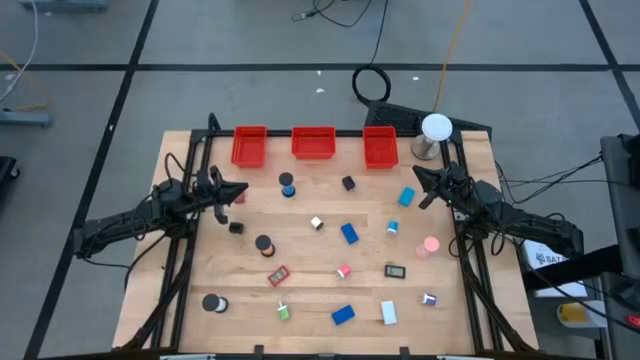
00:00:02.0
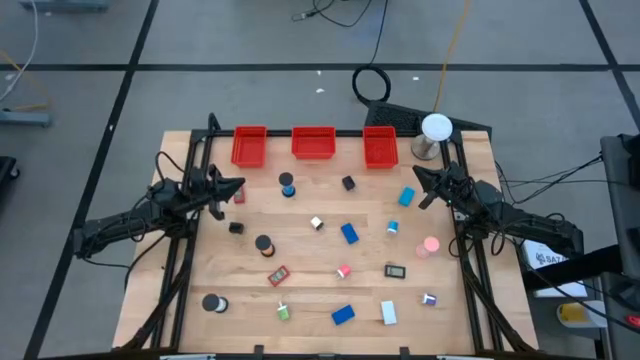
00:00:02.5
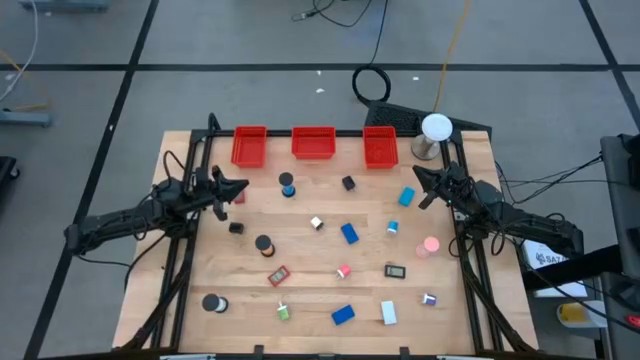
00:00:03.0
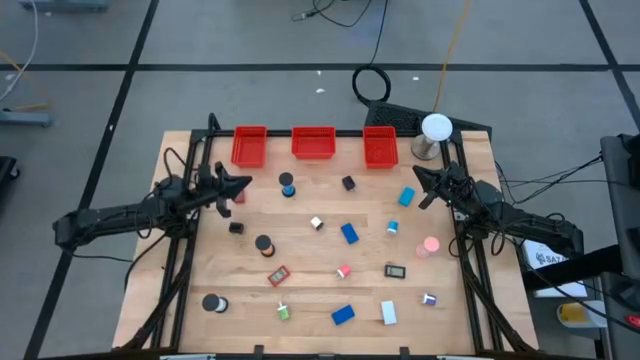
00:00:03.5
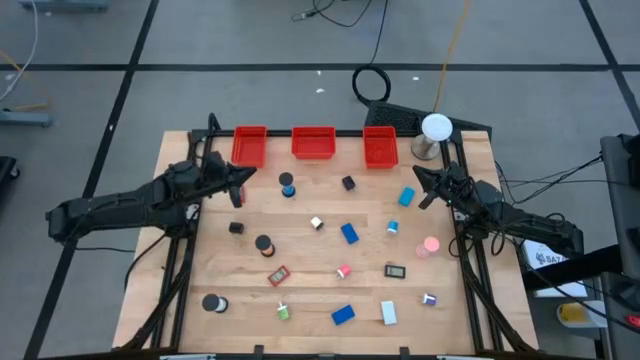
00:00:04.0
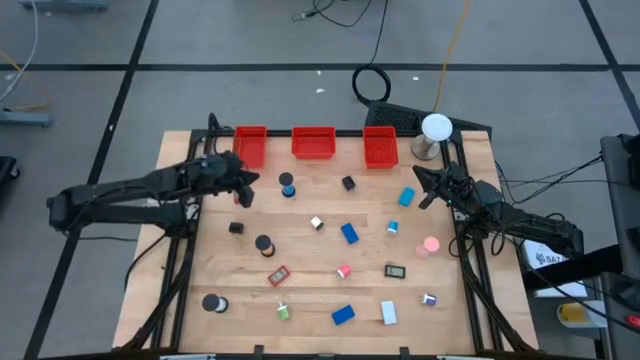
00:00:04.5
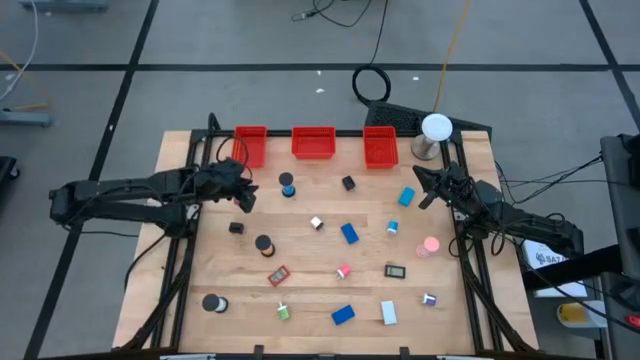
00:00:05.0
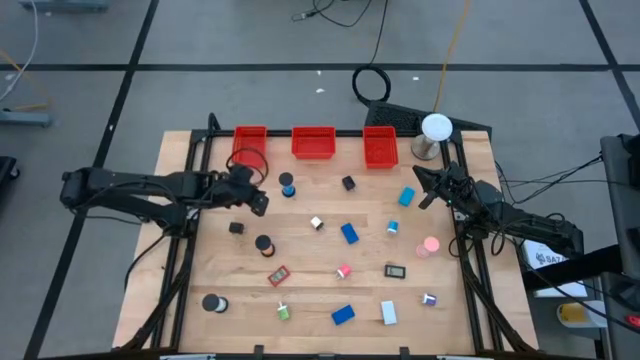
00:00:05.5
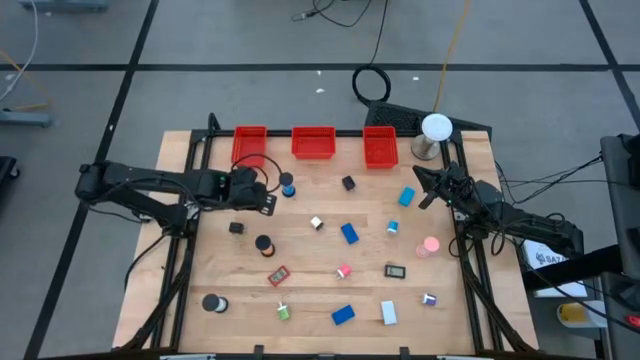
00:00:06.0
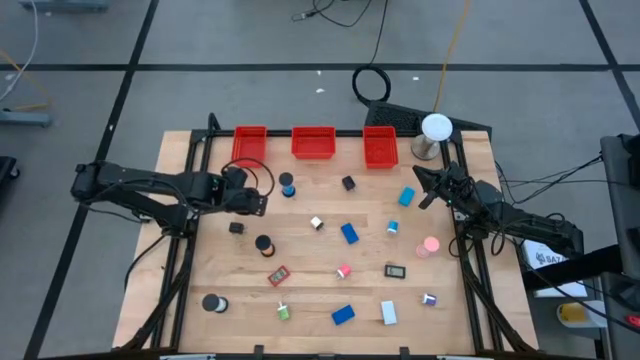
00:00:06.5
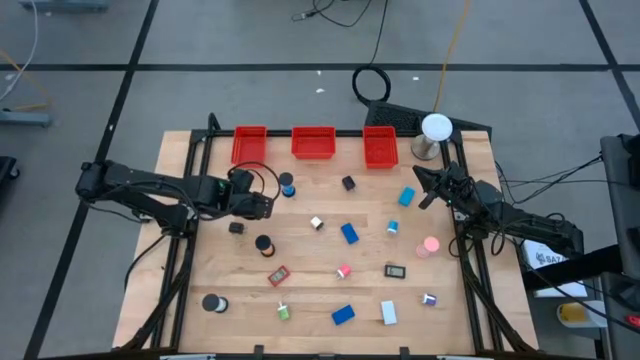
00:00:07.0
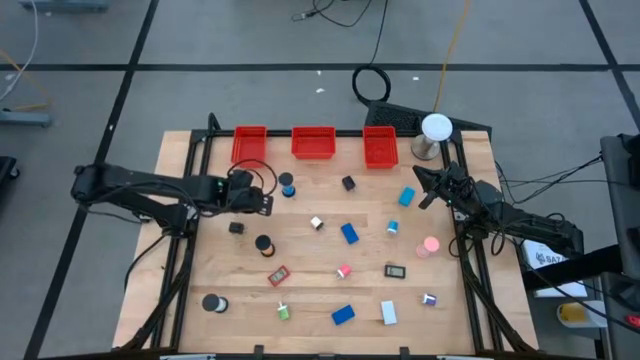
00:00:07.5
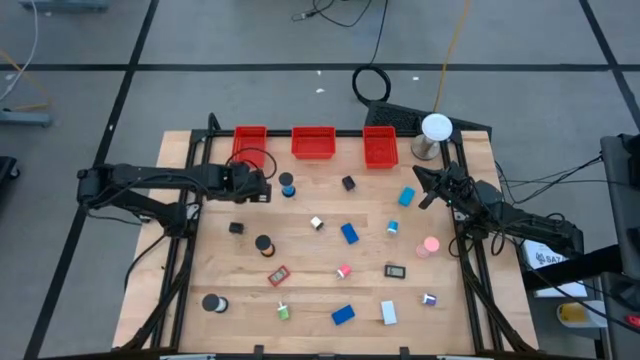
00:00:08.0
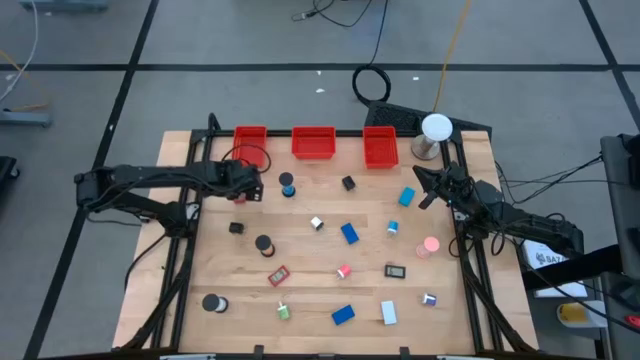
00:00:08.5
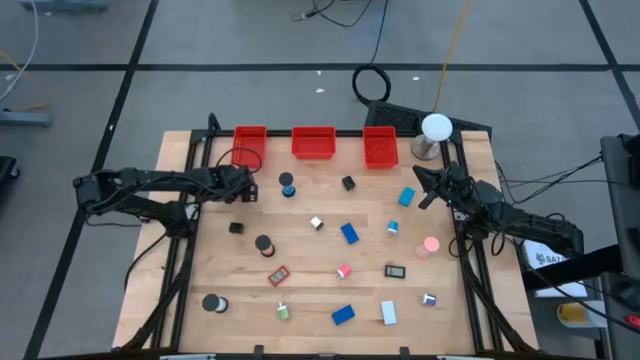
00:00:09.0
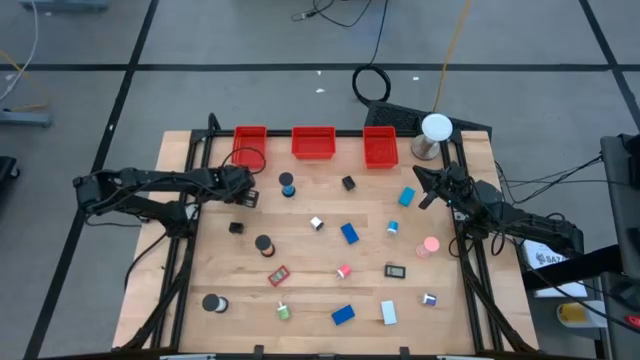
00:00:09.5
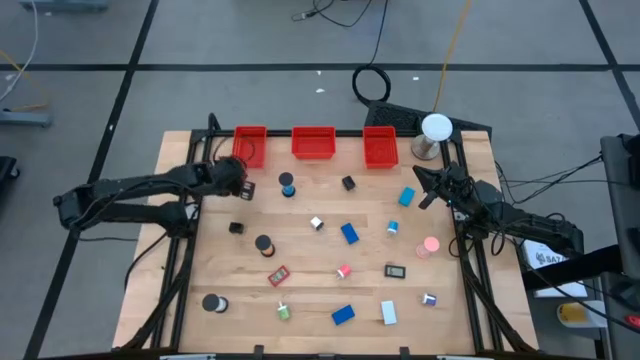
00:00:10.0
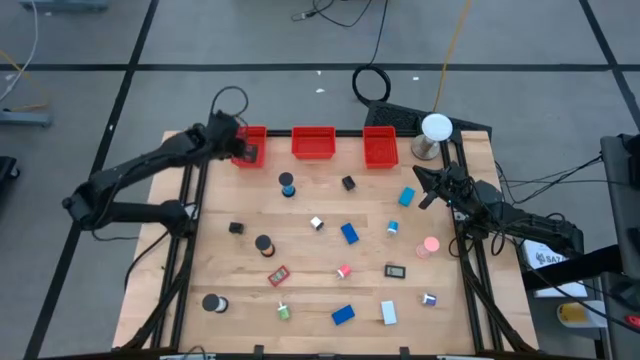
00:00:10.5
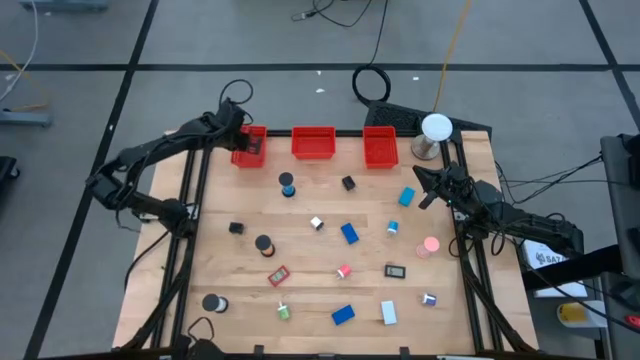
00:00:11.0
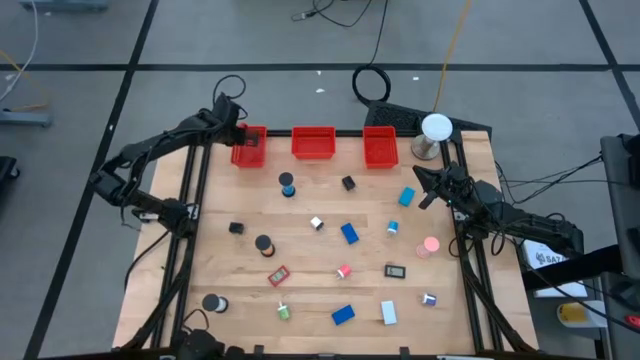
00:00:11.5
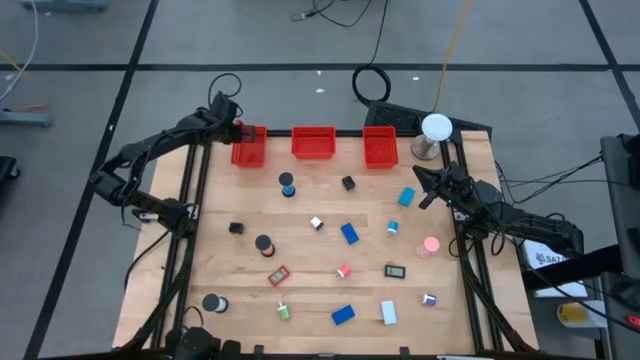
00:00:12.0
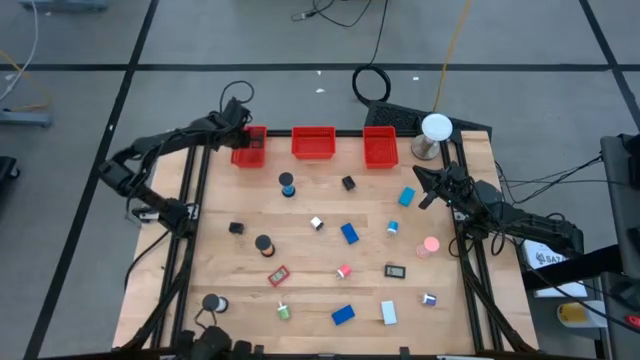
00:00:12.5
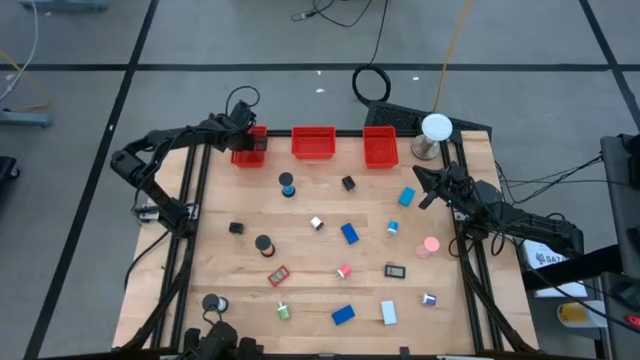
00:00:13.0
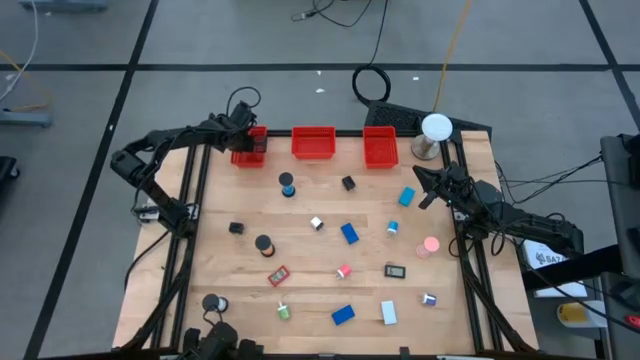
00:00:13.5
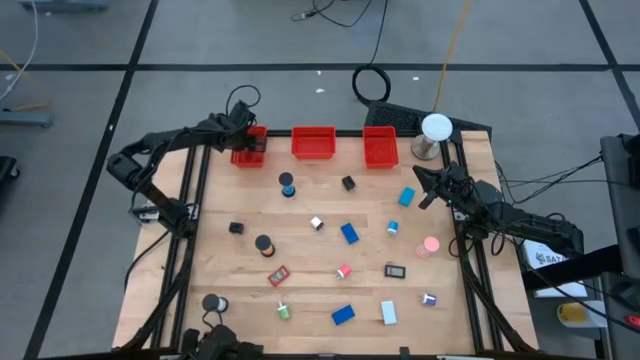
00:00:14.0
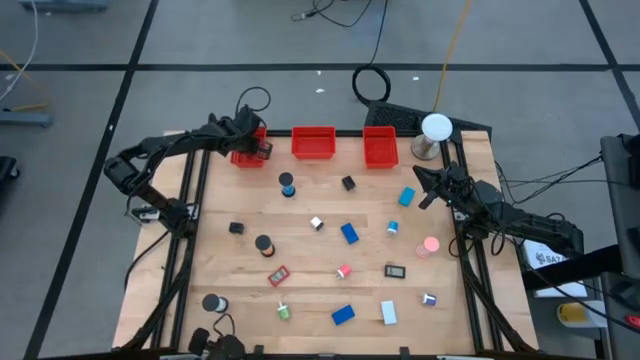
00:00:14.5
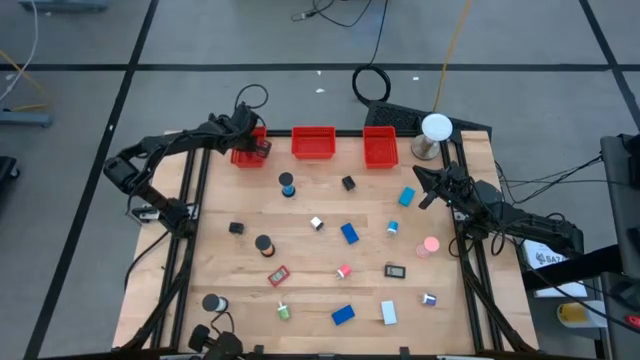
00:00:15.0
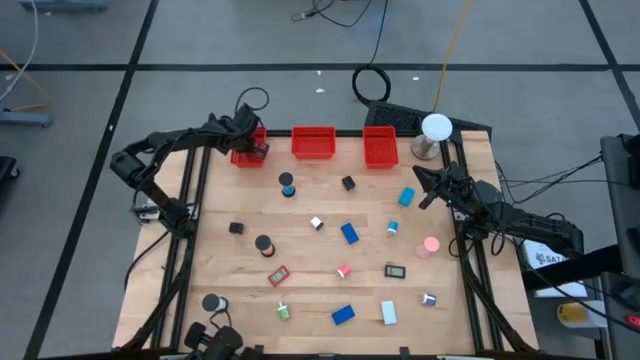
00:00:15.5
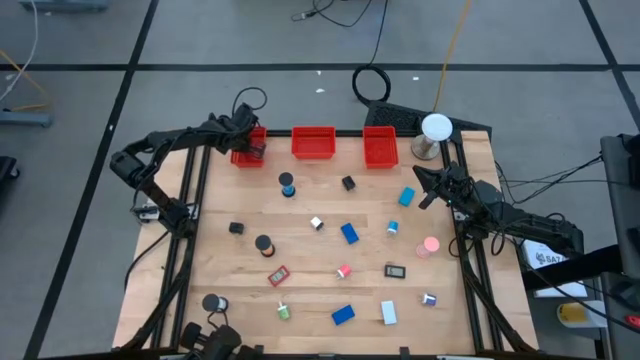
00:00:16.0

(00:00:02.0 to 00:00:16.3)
Task: Pick & Place Office items
Put the red timer into the left orange basket

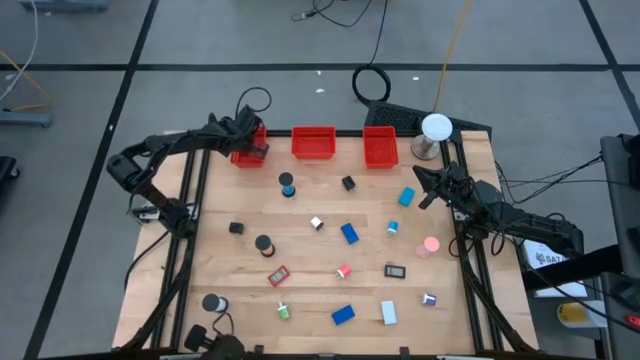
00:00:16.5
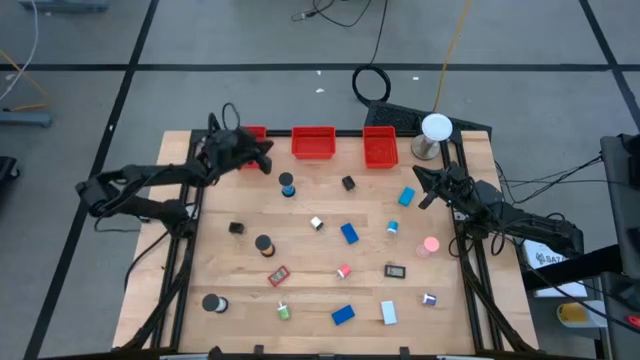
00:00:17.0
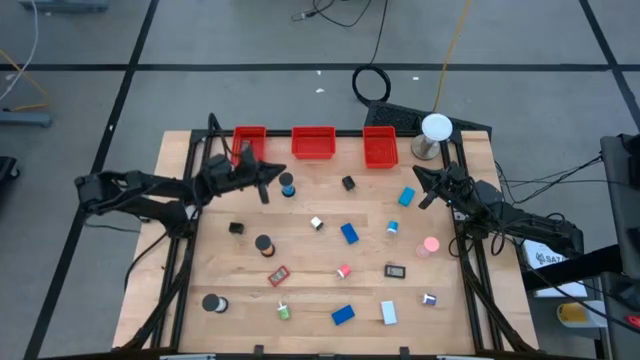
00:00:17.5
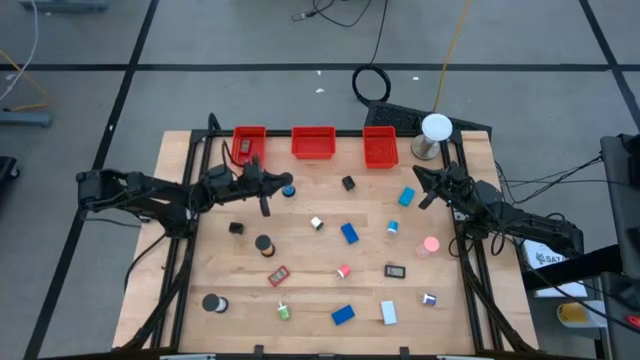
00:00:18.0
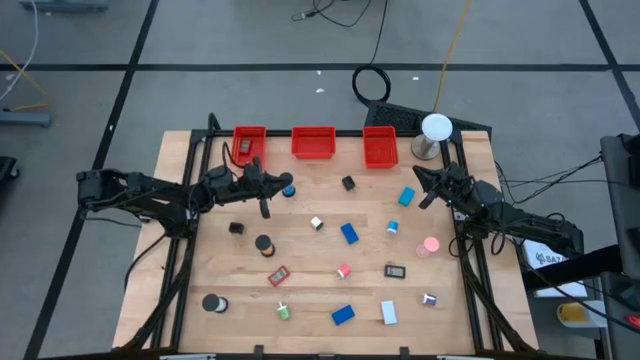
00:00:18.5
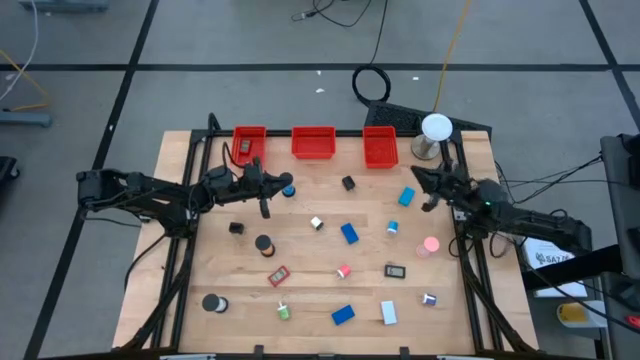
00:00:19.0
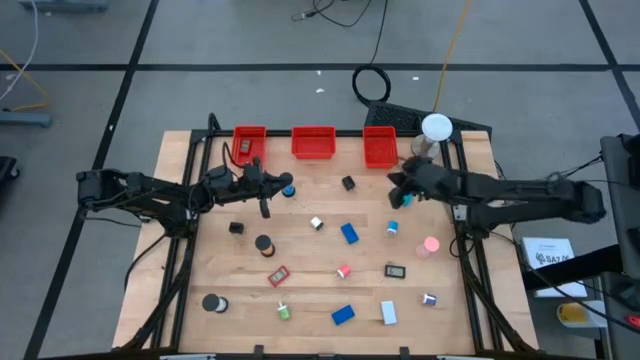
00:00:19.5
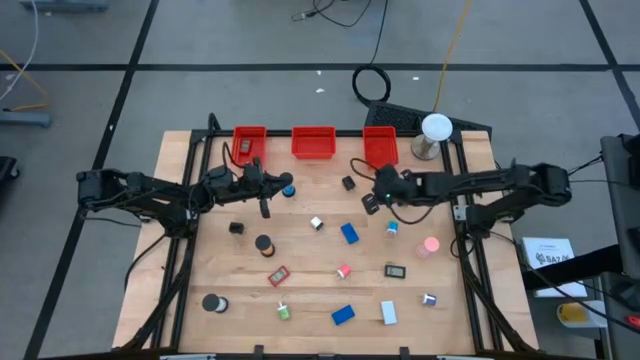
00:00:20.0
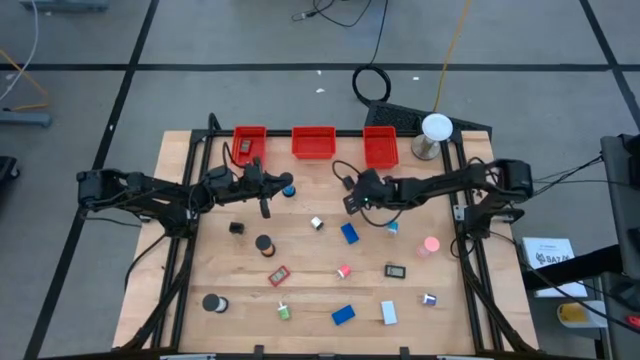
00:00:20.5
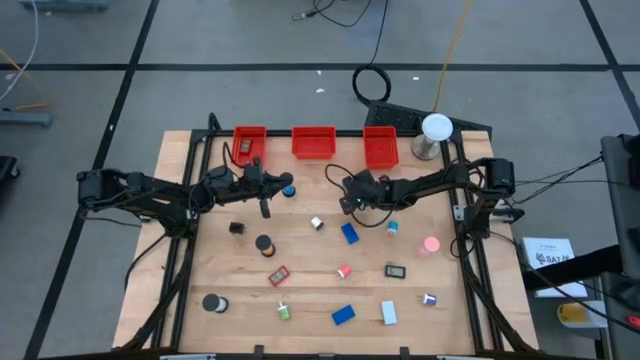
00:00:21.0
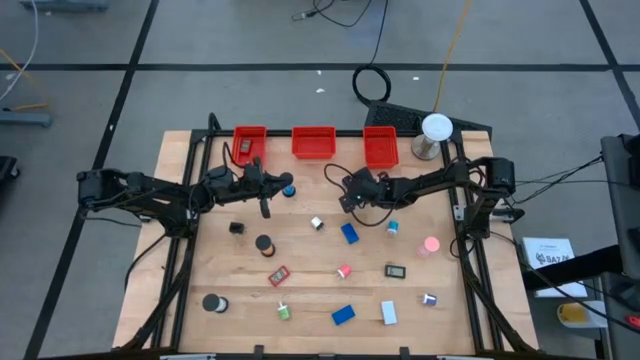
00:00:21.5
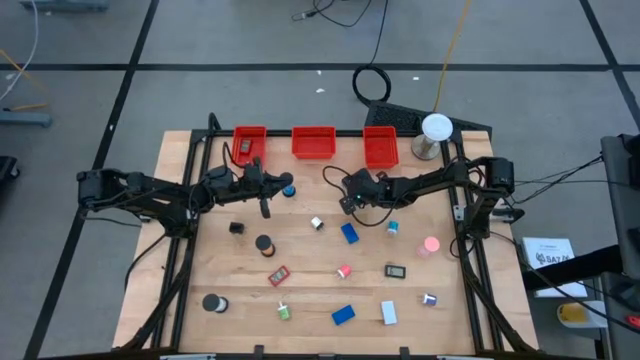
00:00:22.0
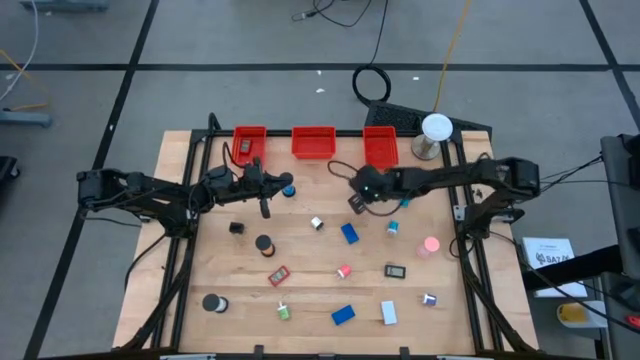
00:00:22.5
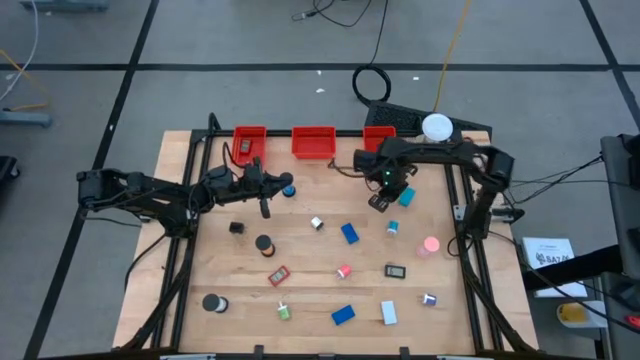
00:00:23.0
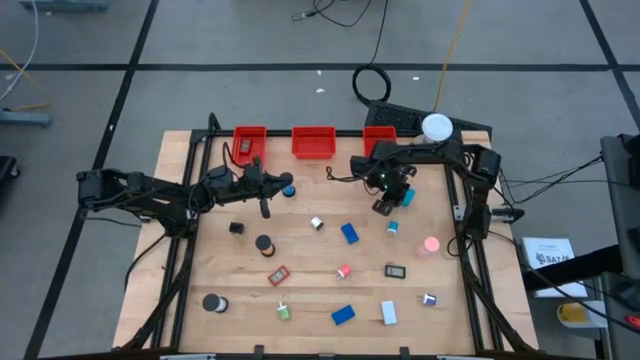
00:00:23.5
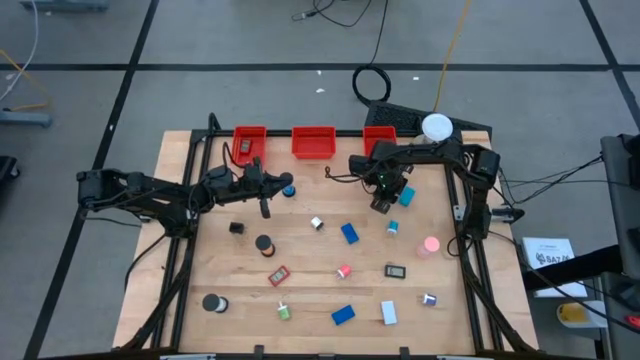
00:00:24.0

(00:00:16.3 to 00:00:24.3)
Put the black charger adapter into the right orange basket
